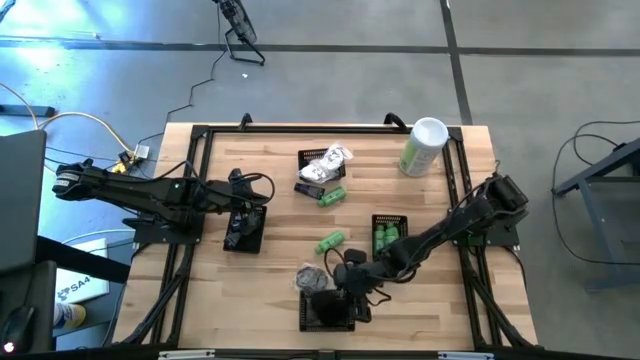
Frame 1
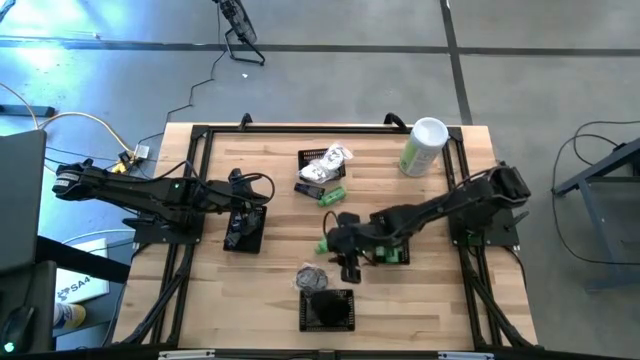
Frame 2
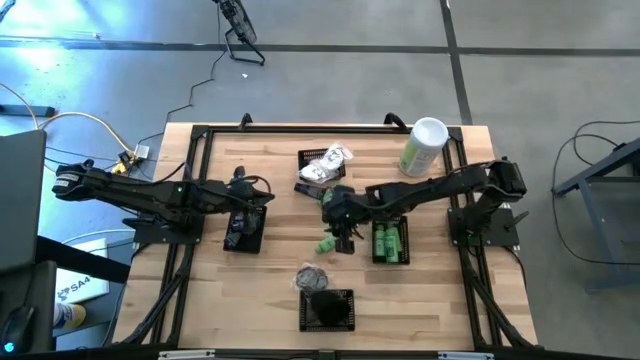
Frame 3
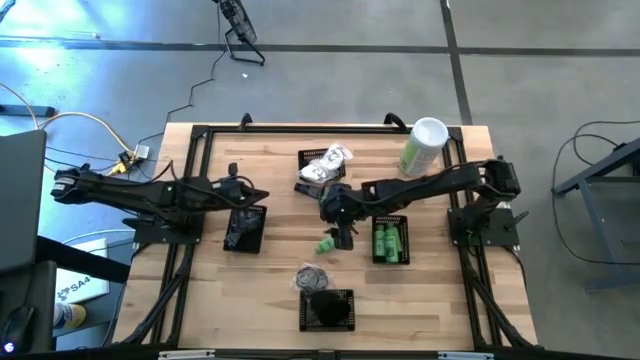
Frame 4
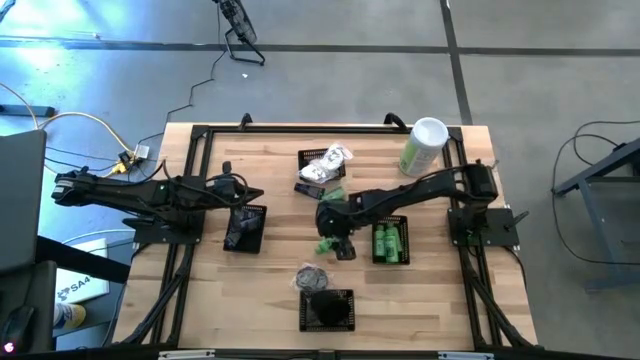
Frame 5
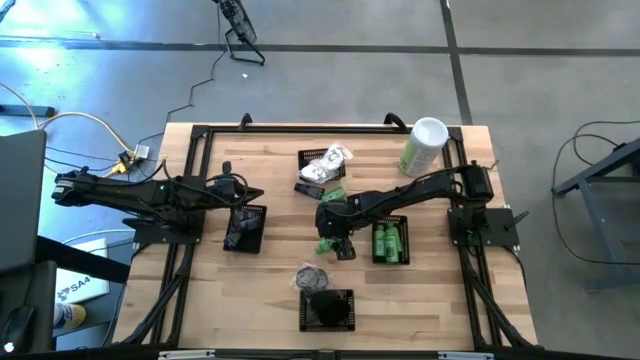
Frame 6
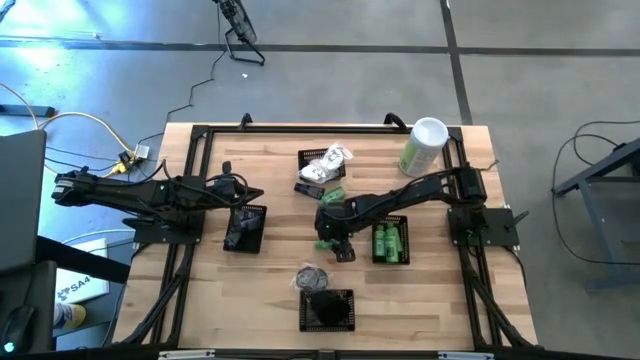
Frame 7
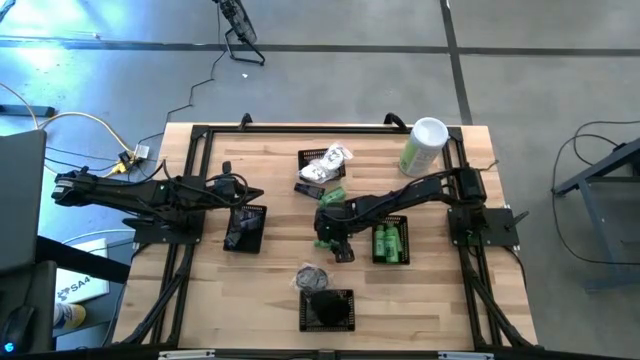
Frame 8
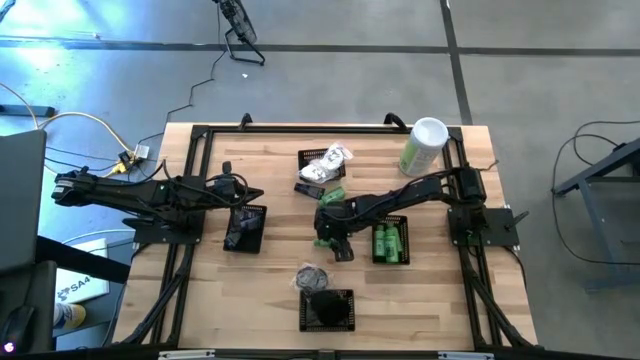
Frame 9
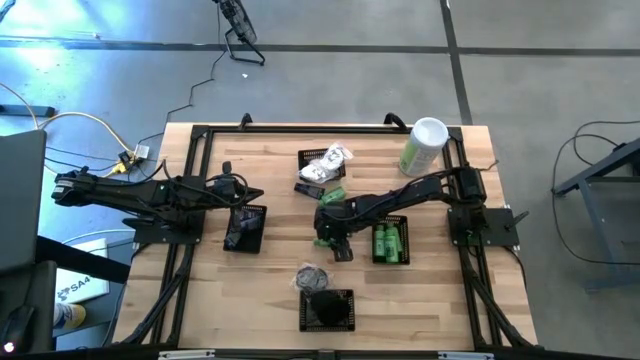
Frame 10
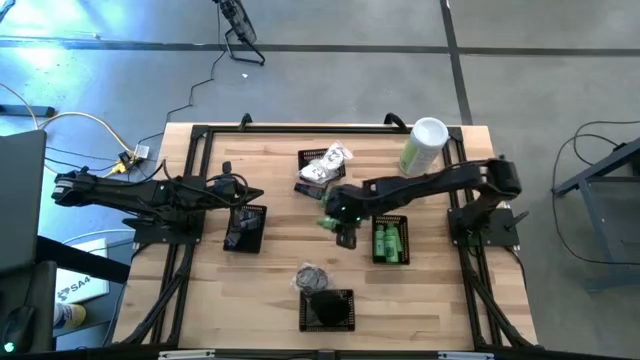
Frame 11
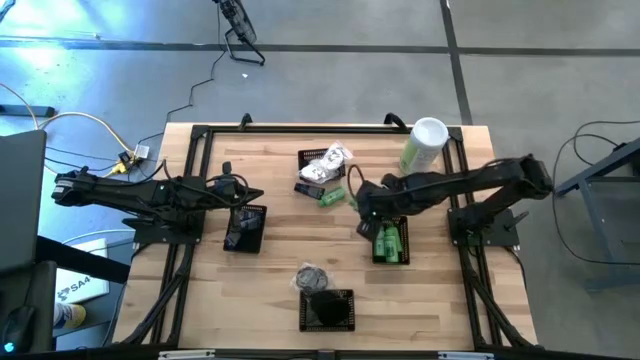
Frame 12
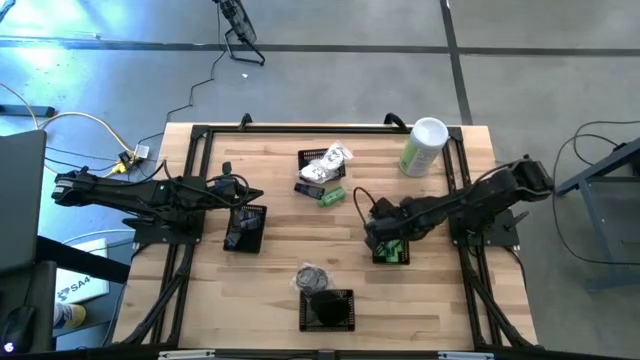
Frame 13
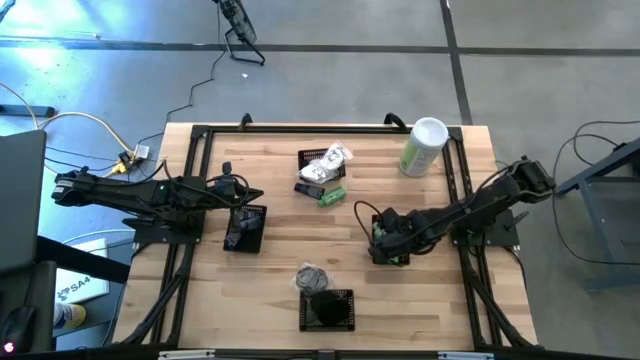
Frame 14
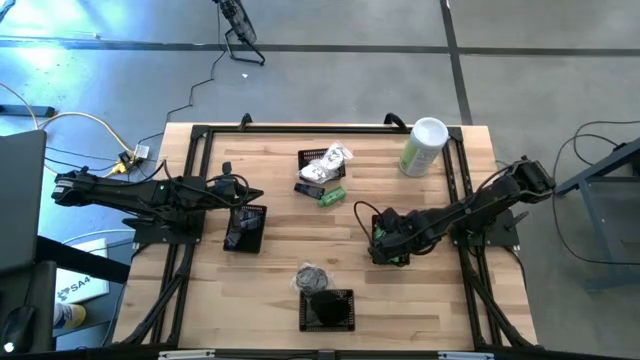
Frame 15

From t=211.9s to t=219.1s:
Task: Pick & Place Travel size toiletries
Put the green bottle into the middle right black bin

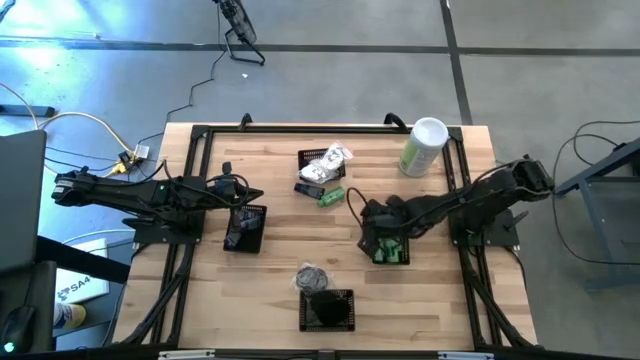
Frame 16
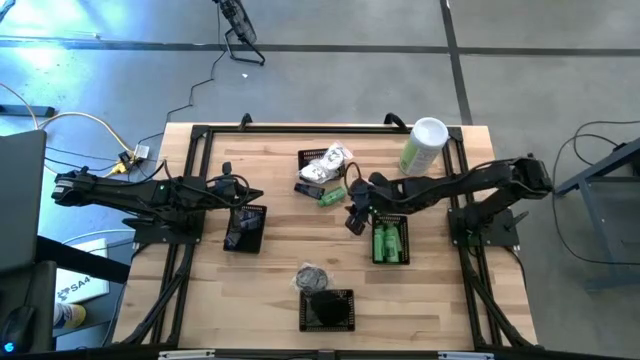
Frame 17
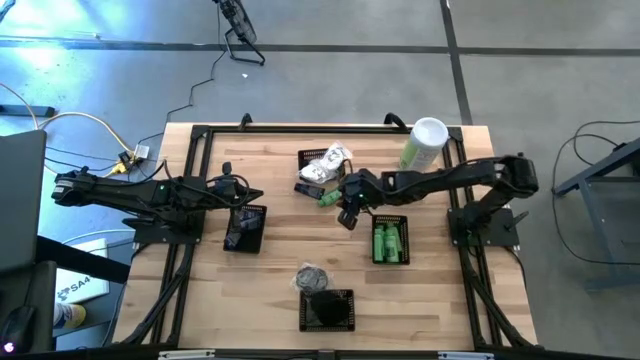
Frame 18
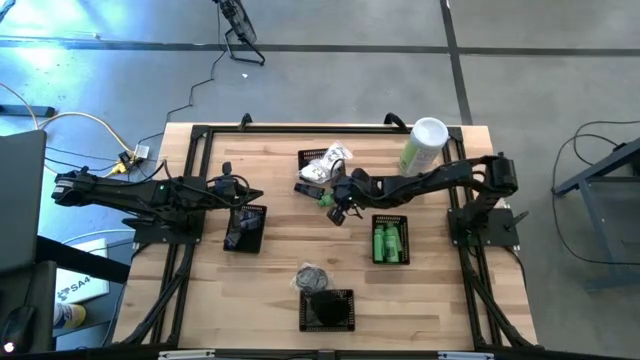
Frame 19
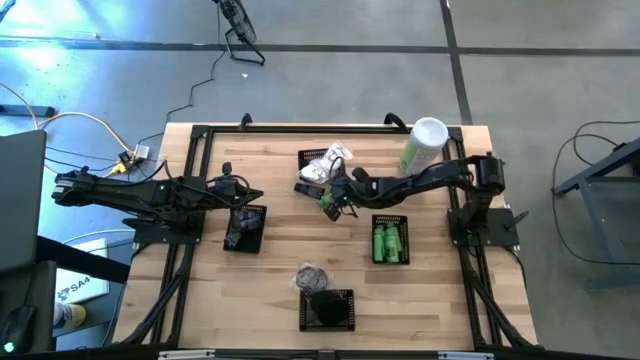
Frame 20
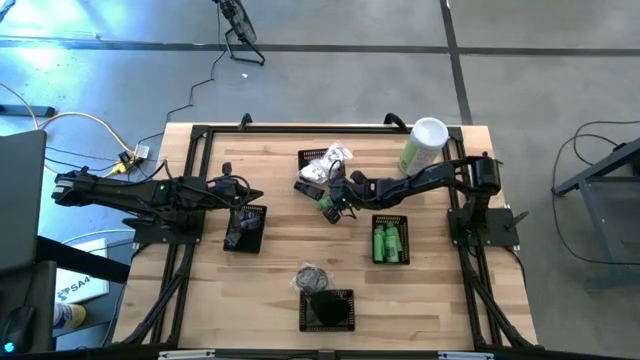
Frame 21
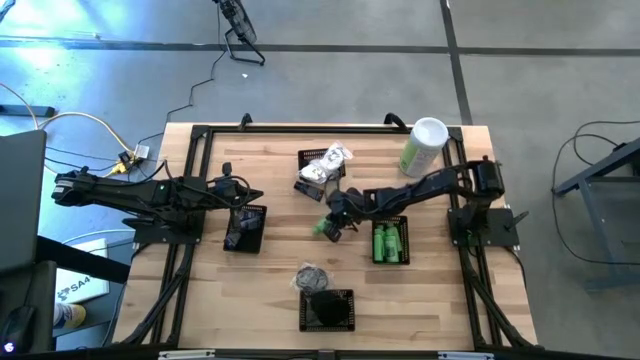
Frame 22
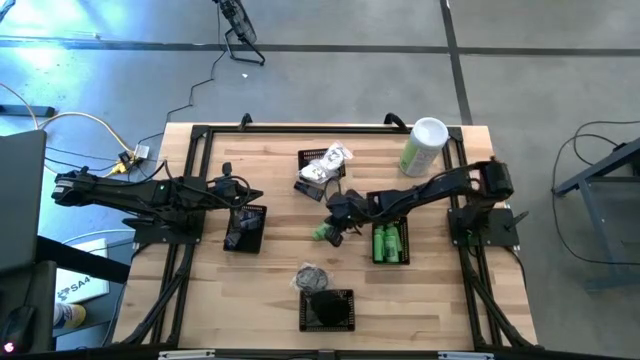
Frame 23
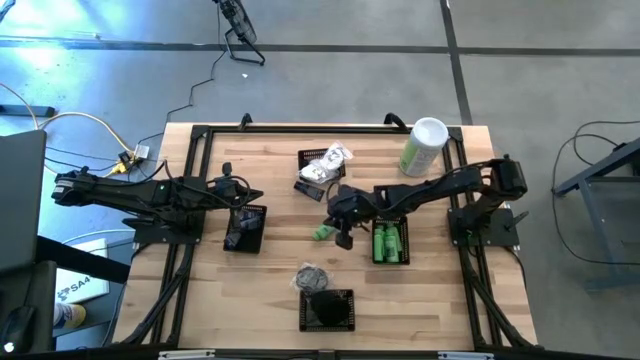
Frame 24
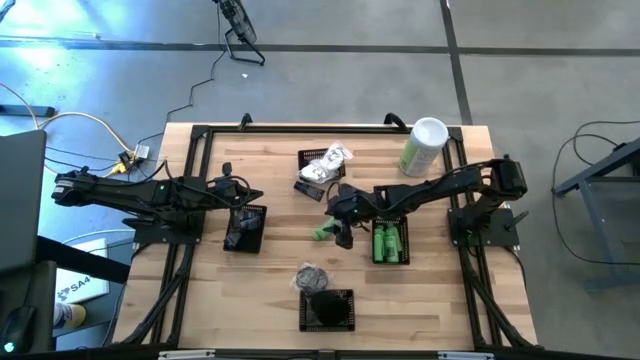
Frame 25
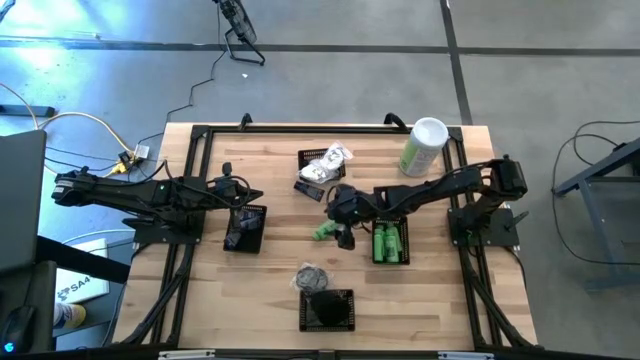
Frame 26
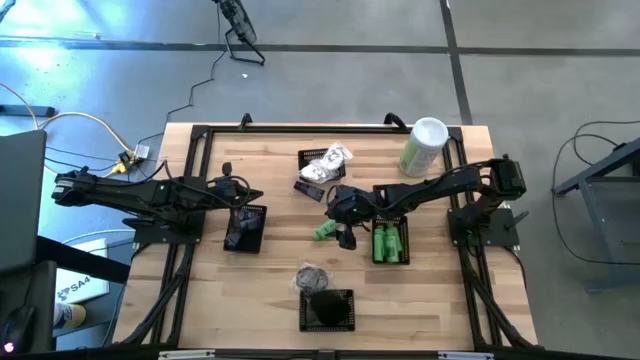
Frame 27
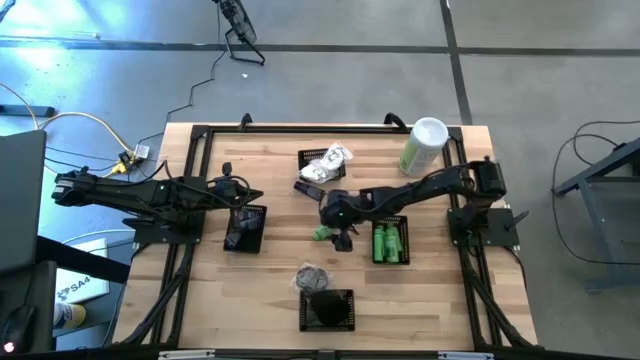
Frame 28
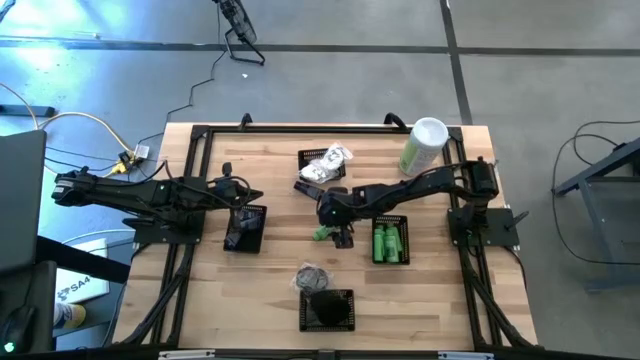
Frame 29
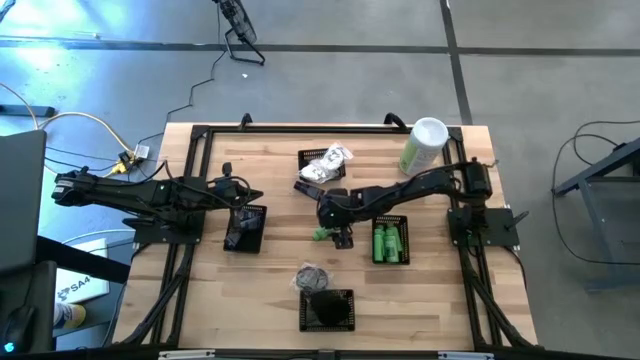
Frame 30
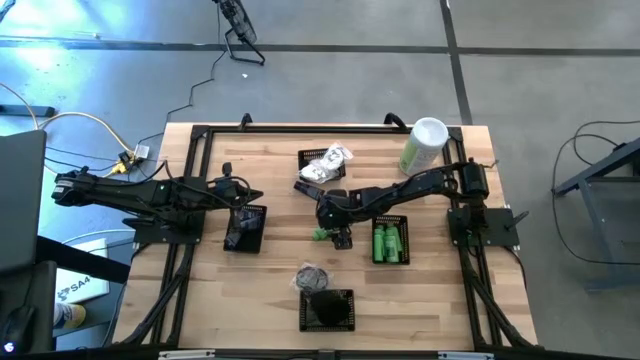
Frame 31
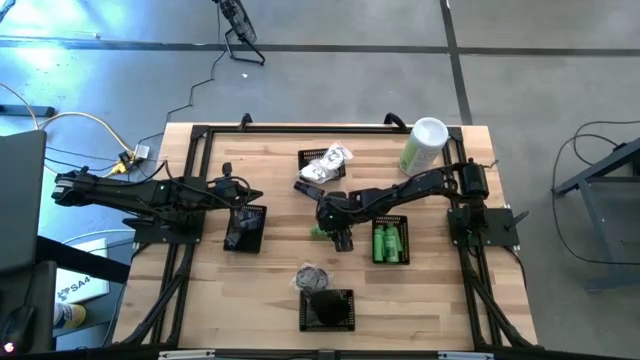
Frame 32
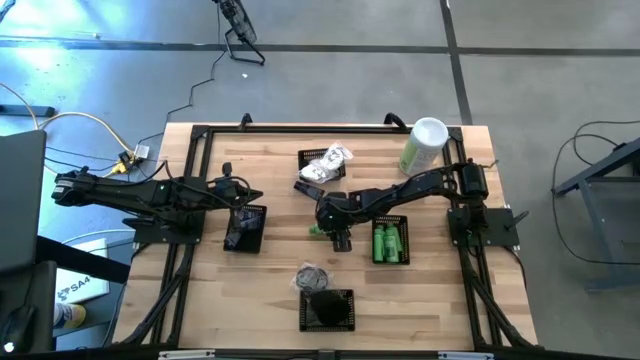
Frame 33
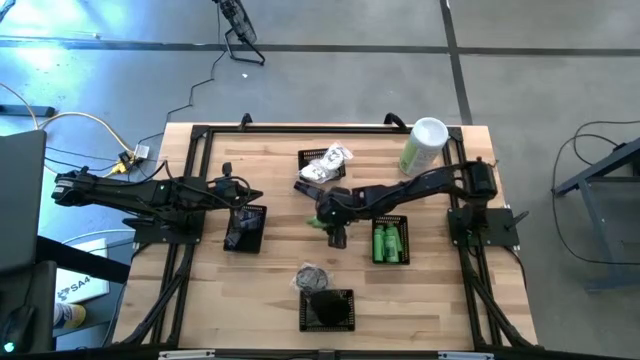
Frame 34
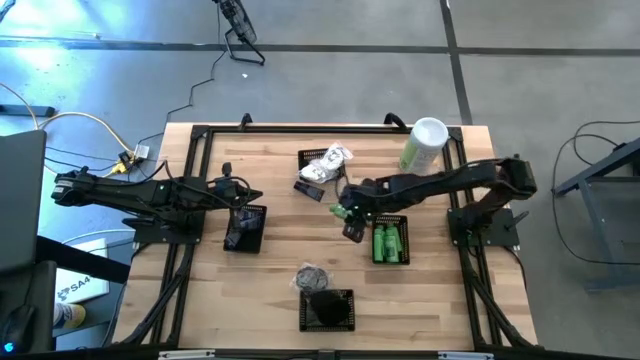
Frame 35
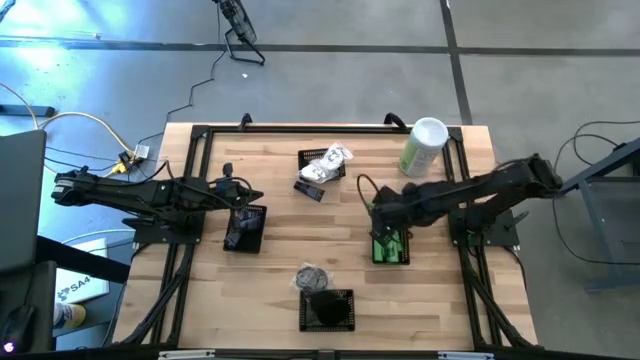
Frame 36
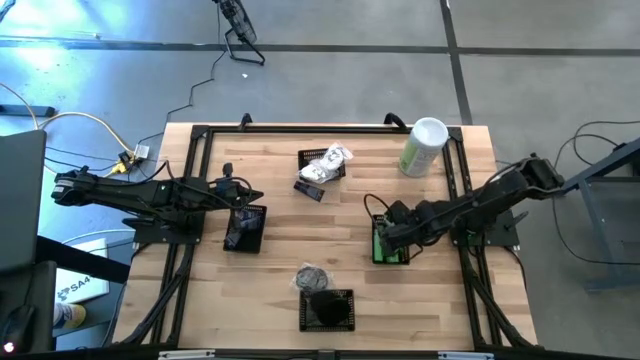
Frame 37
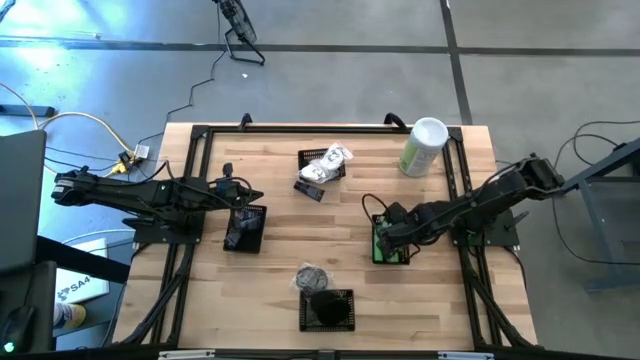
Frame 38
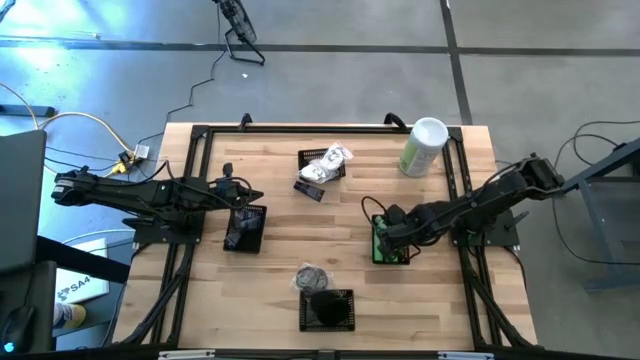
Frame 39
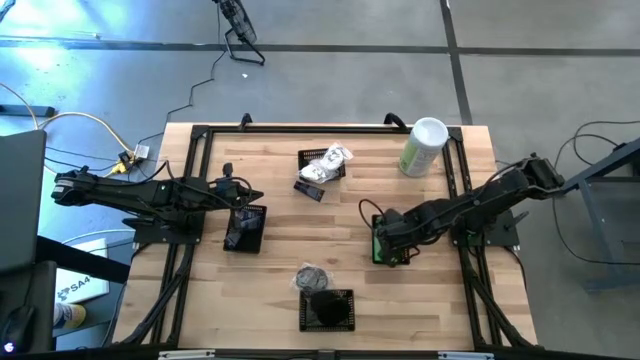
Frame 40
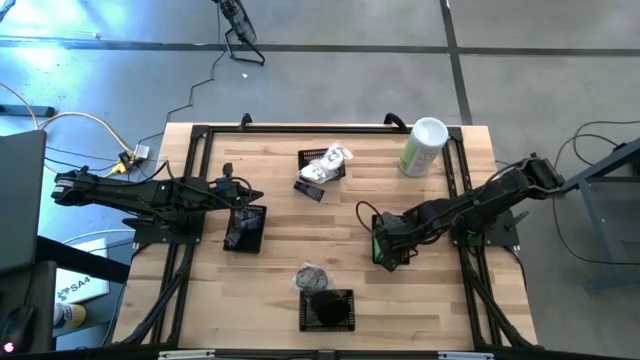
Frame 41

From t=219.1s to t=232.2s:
Put the green bottle into the middle right black bin
